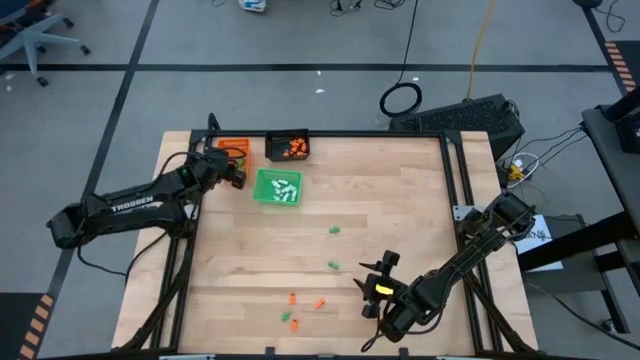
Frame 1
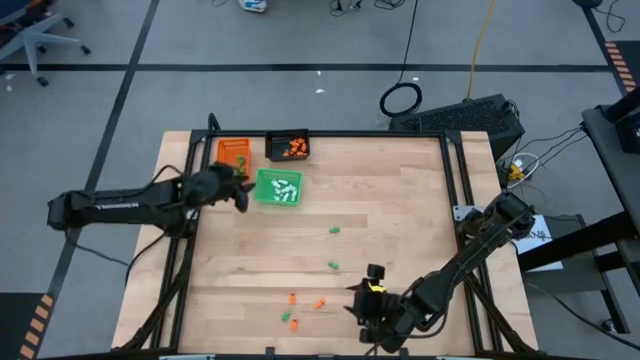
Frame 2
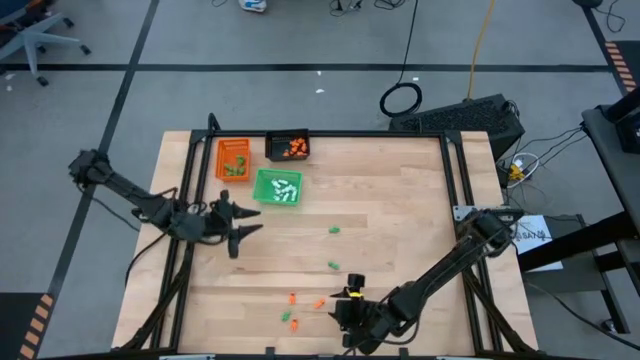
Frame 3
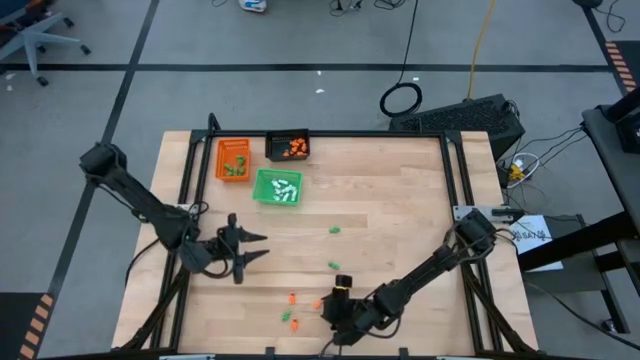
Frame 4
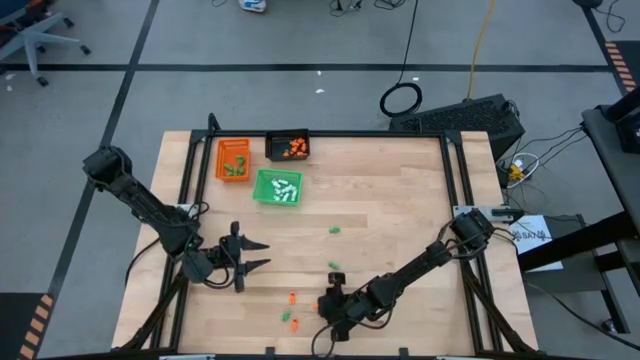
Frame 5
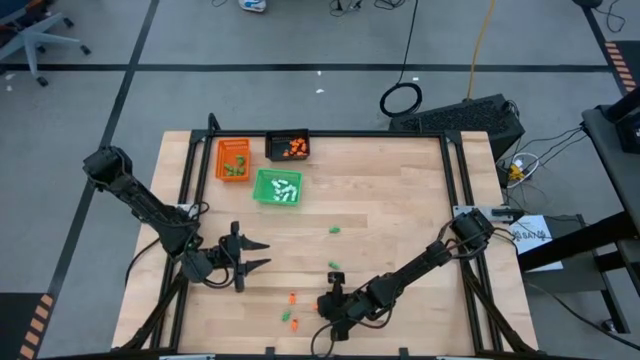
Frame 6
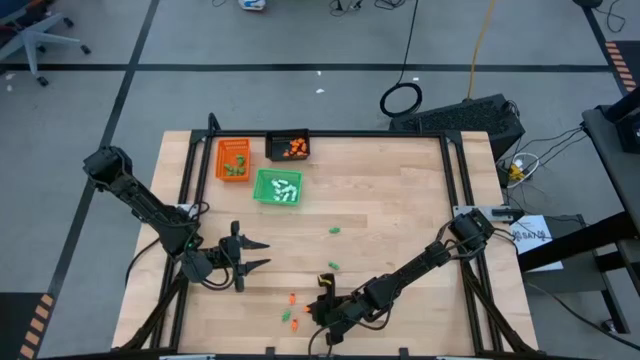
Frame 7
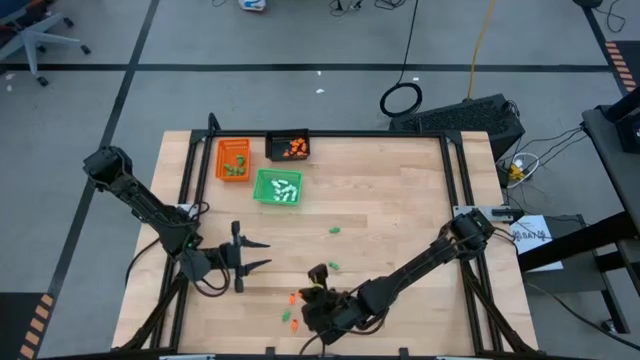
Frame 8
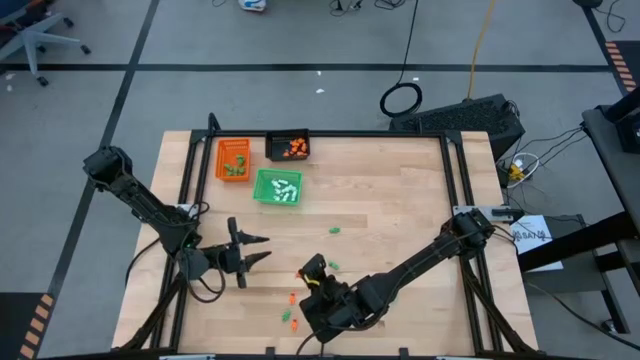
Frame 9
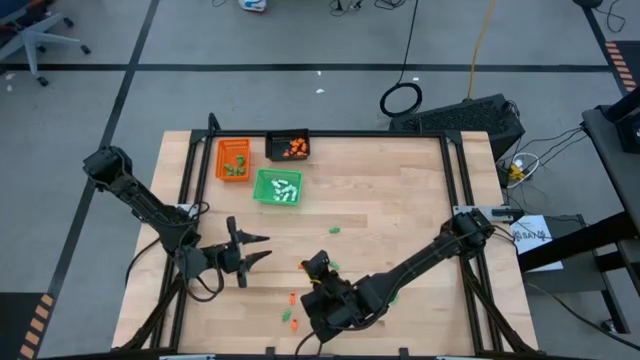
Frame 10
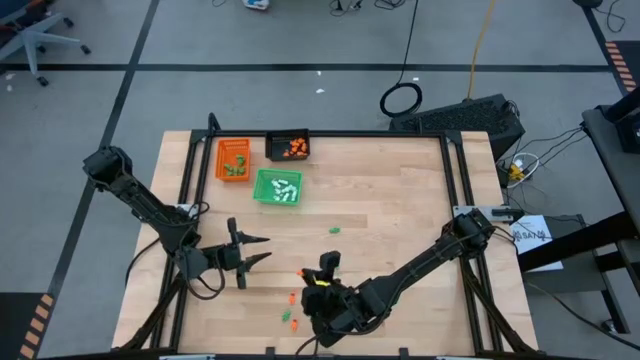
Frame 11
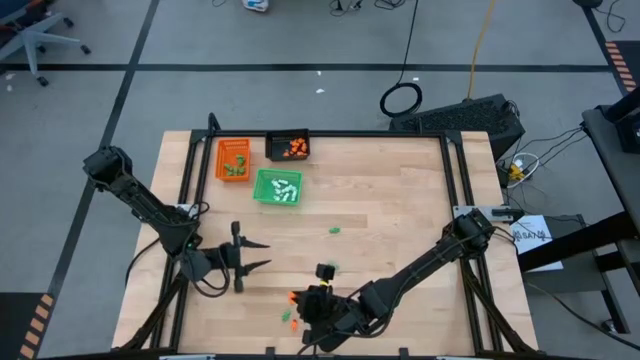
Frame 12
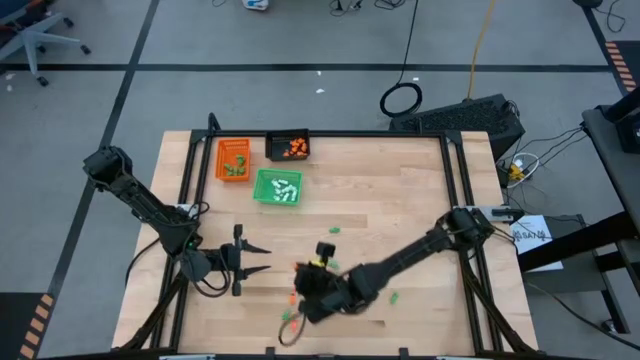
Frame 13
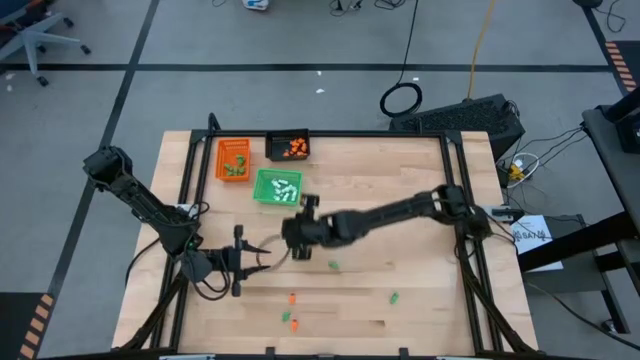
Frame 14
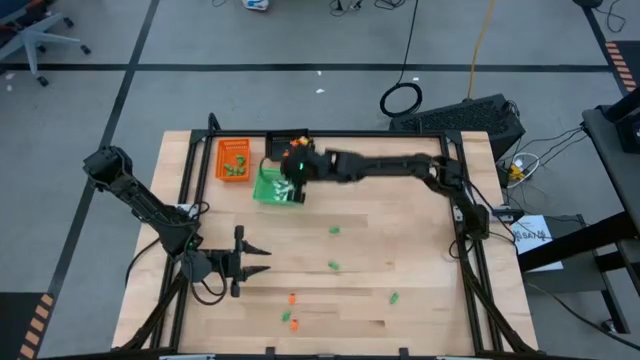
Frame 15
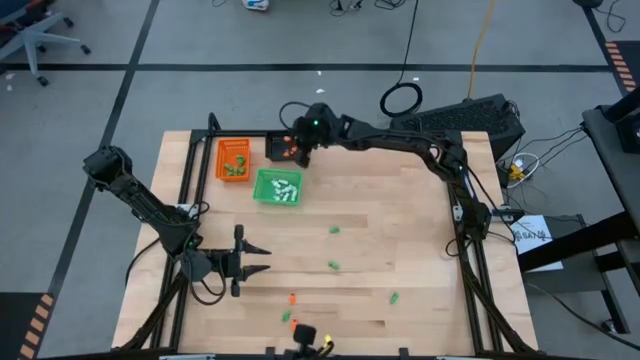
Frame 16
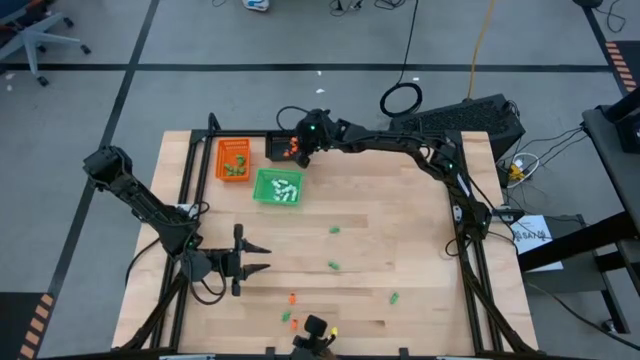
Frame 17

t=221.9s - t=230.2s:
Task: Sort Halloween decoration
Put the orange skeleton toy into the black bin

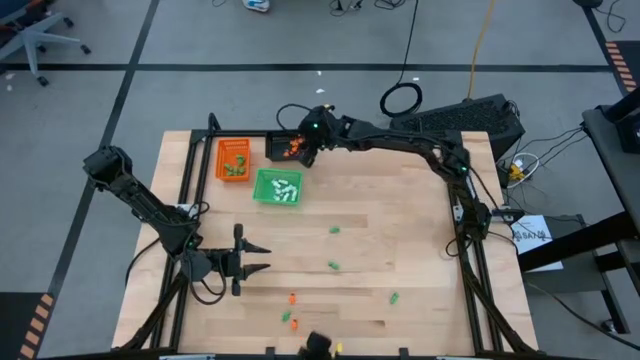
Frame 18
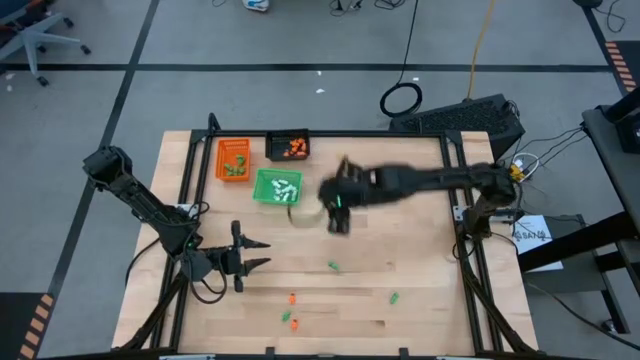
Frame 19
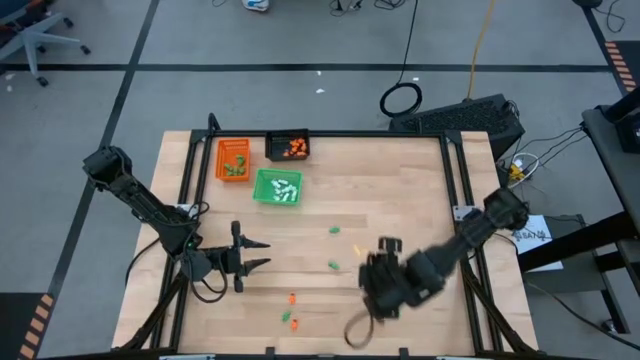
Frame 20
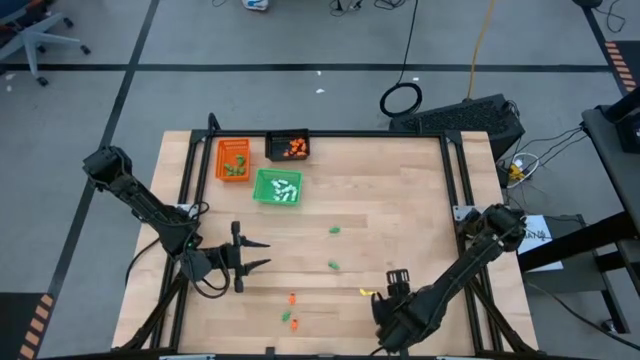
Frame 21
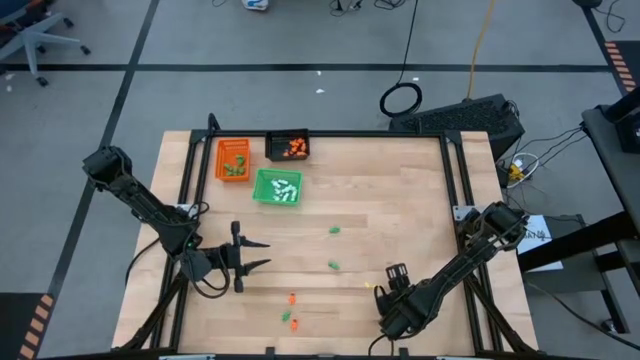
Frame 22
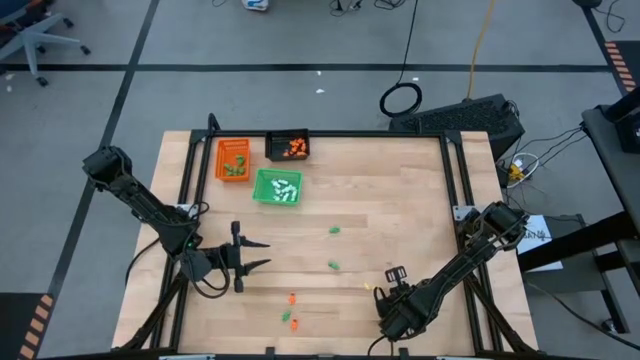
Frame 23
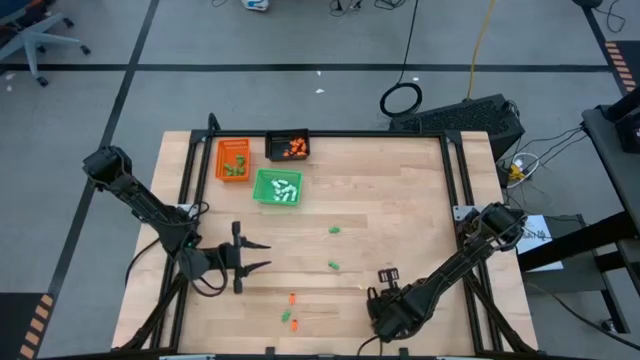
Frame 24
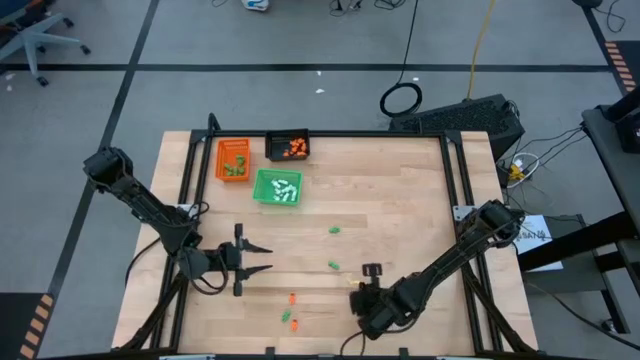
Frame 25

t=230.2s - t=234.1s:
Put the green skeleton toy into the orange bin

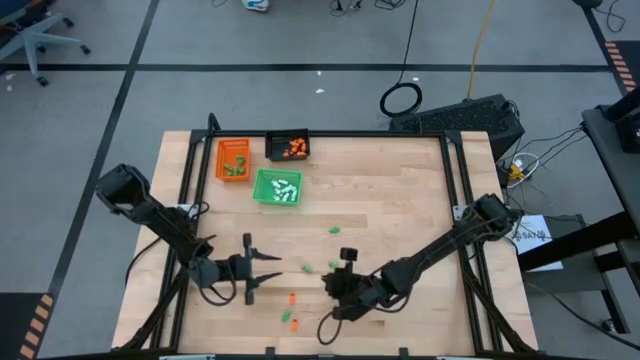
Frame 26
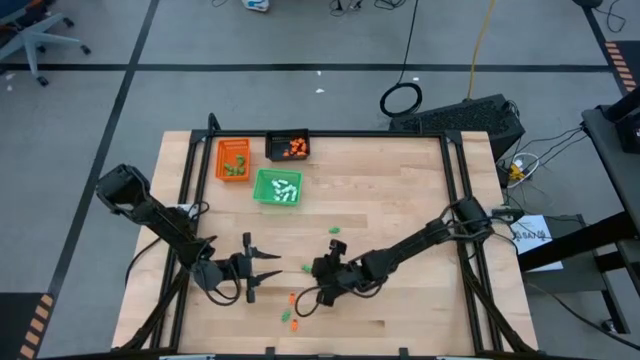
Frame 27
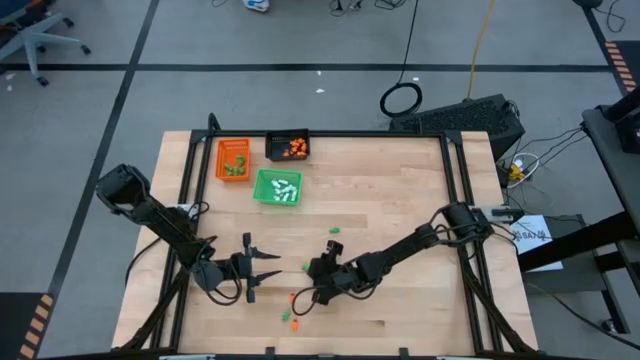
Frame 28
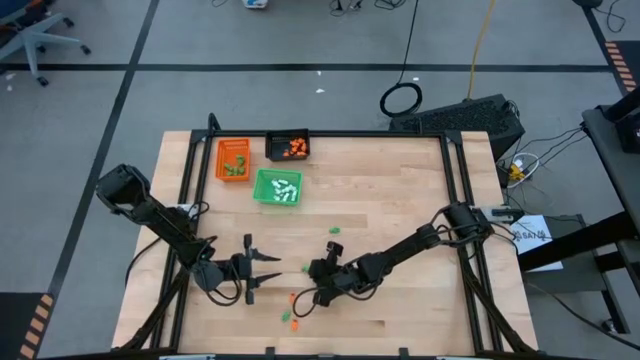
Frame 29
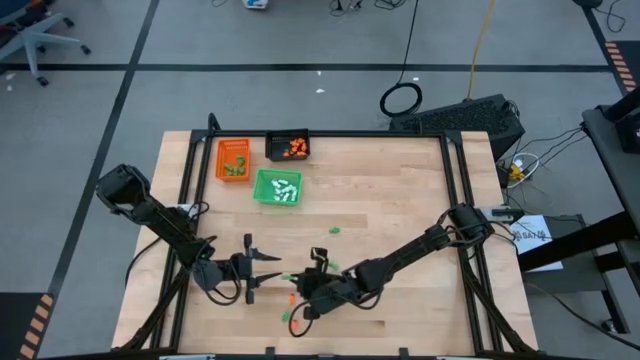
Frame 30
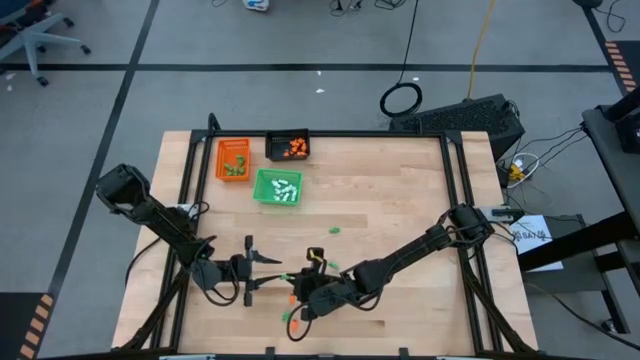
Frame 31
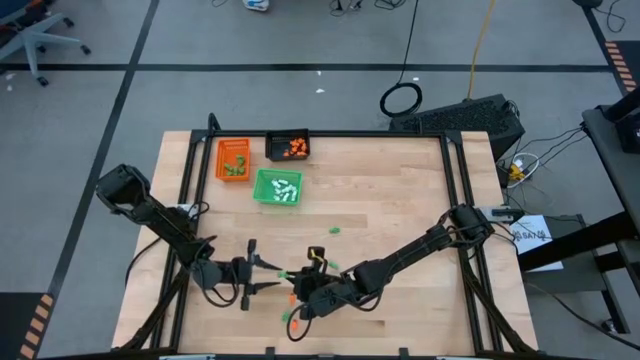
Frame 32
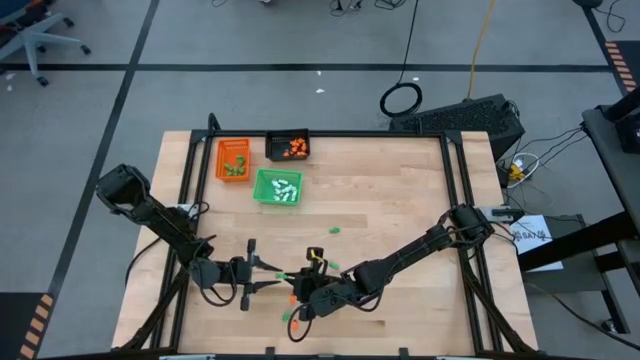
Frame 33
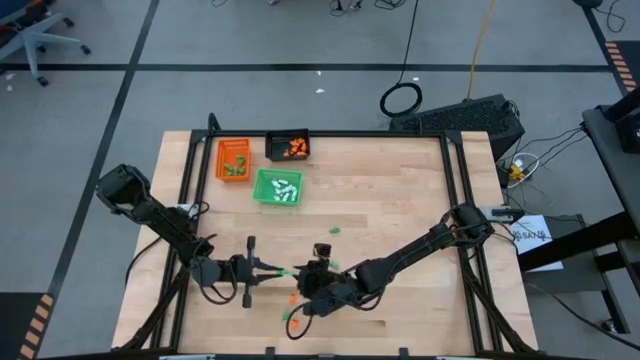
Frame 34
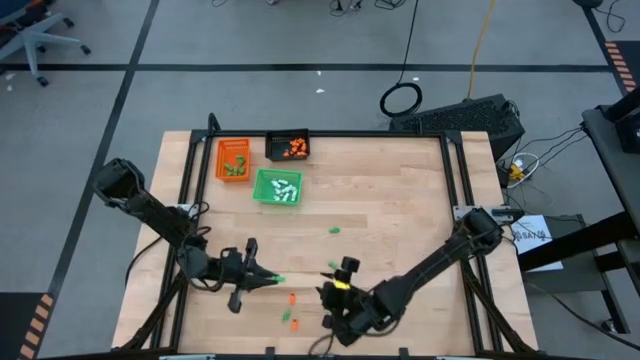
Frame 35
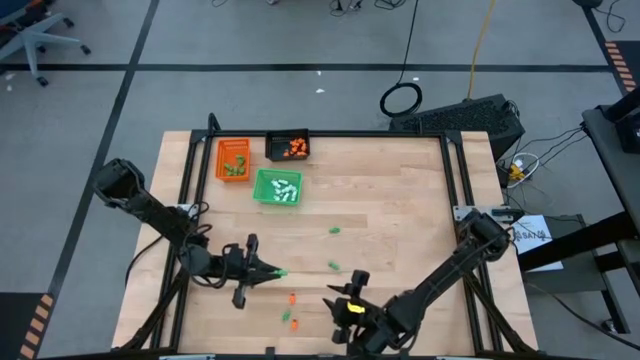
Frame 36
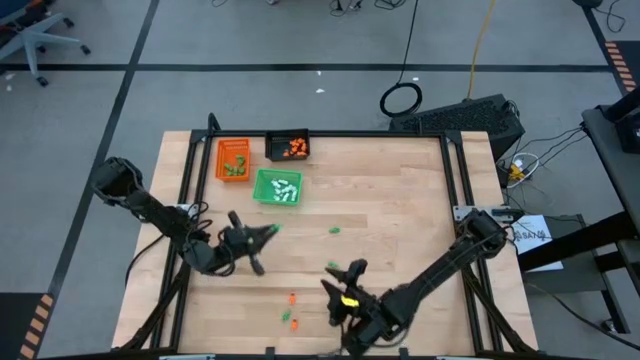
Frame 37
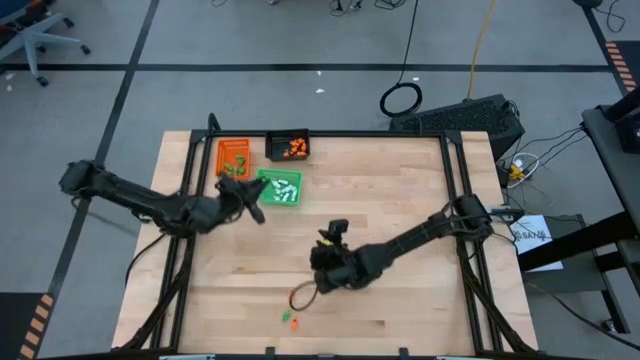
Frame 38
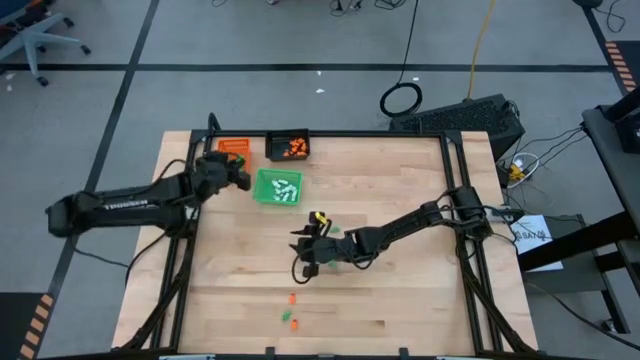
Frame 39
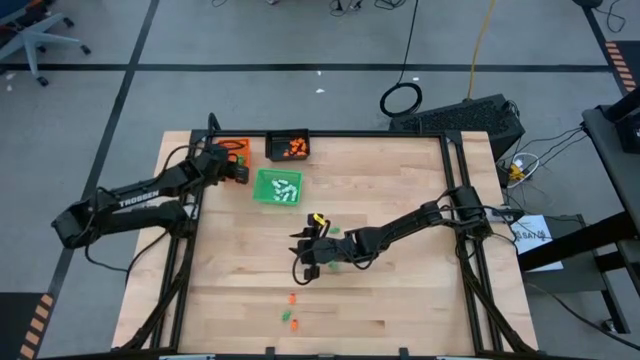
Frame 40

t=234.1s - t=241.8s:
Put the green skeleton toy into the orange bin

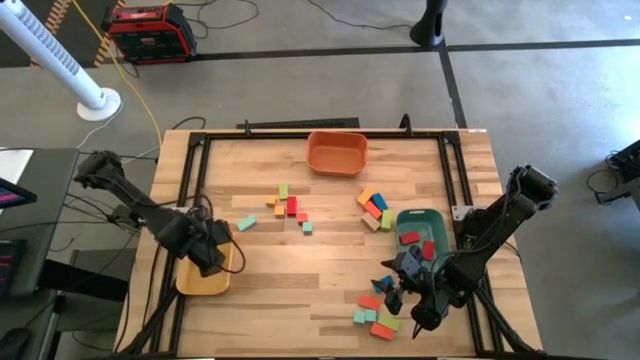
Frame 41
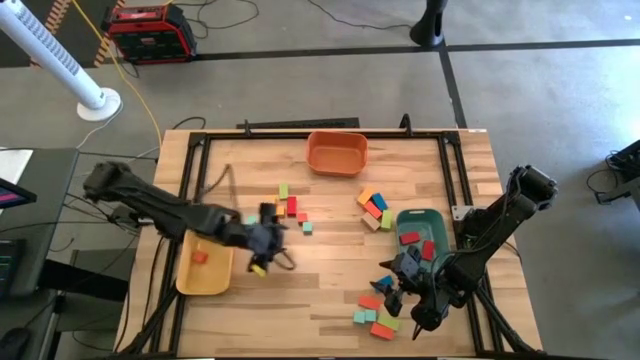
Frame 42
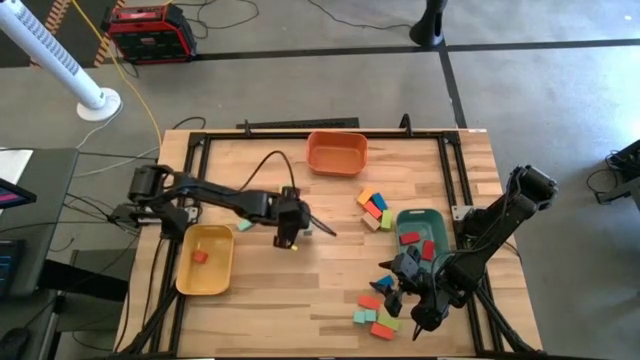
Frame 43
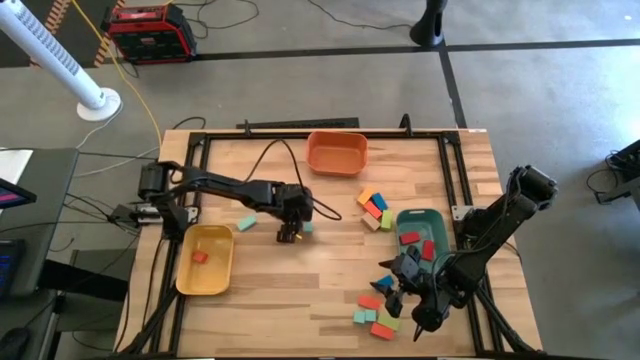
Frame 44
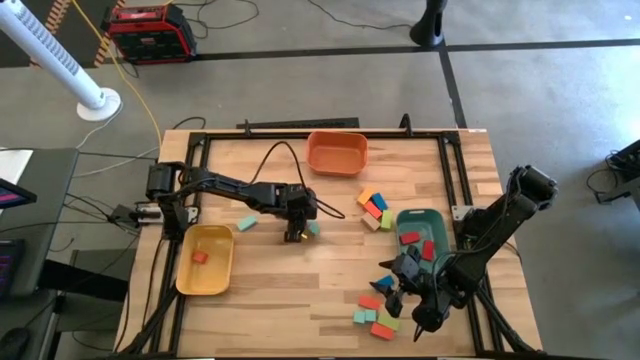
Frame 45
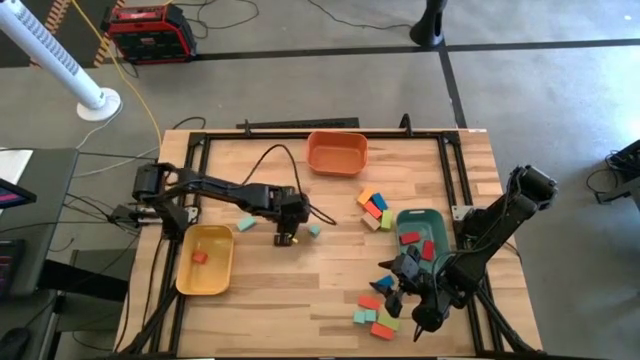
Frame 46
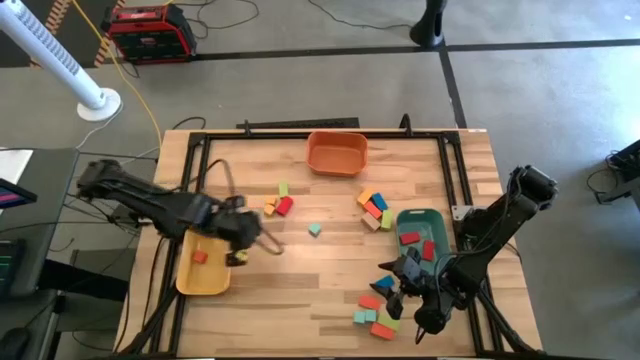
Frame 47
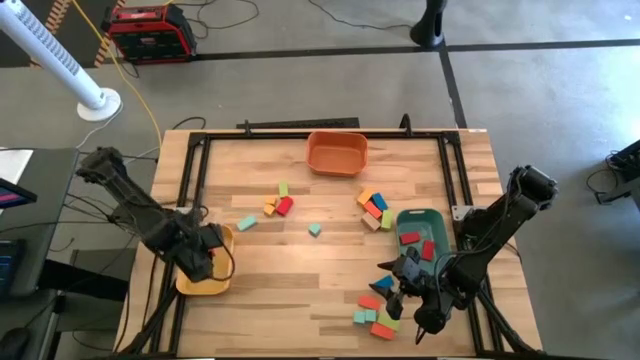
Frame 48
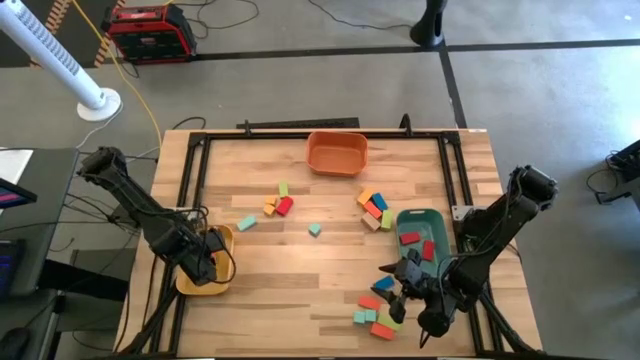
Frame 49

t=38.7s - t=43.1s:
Task: Sort blocks by size
Put the small orange block into the yellow bin
